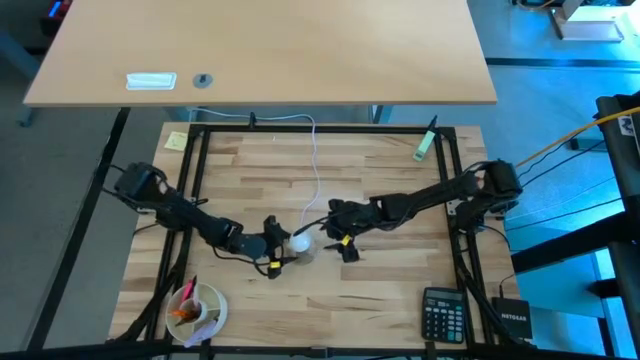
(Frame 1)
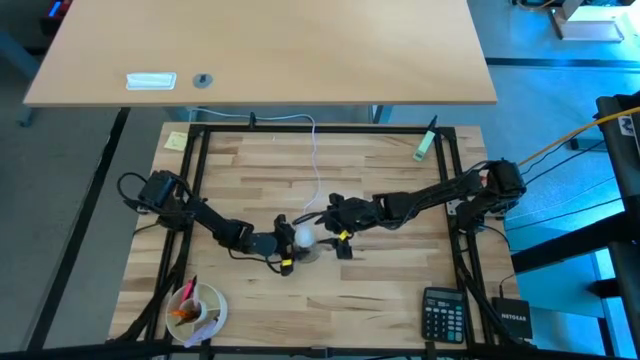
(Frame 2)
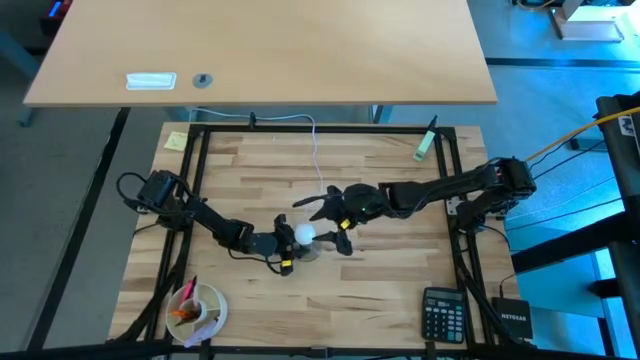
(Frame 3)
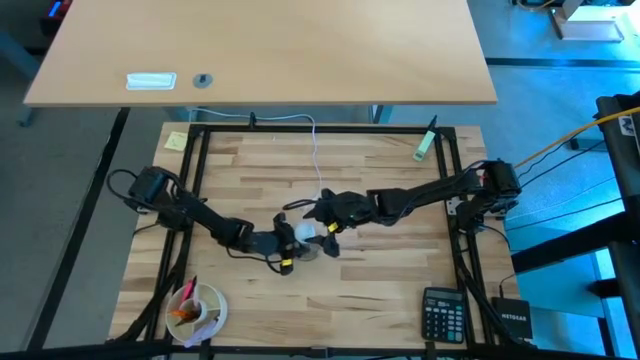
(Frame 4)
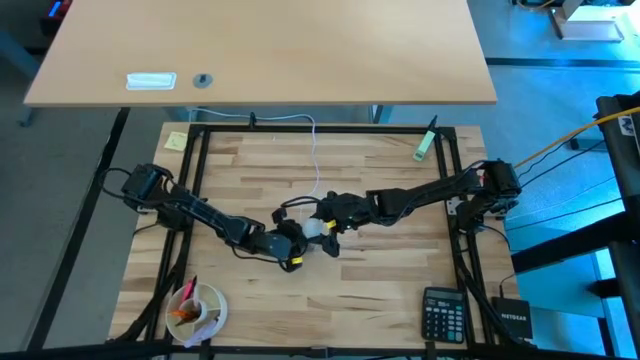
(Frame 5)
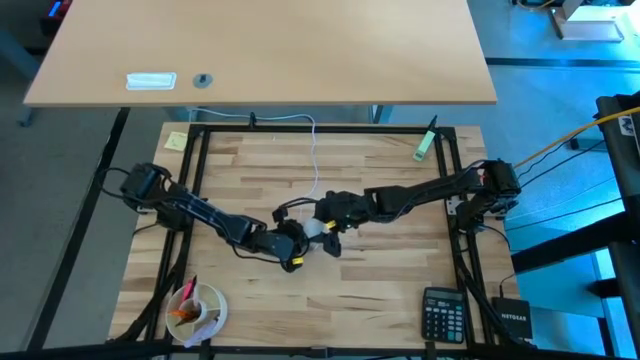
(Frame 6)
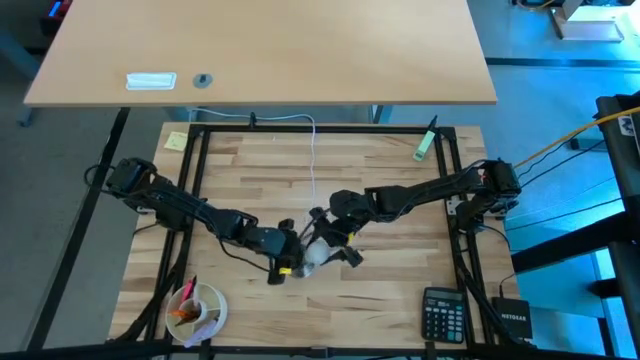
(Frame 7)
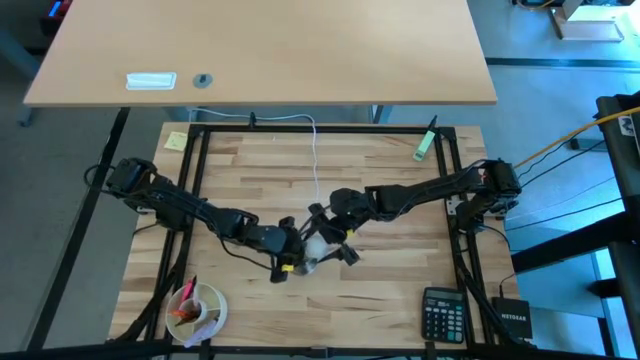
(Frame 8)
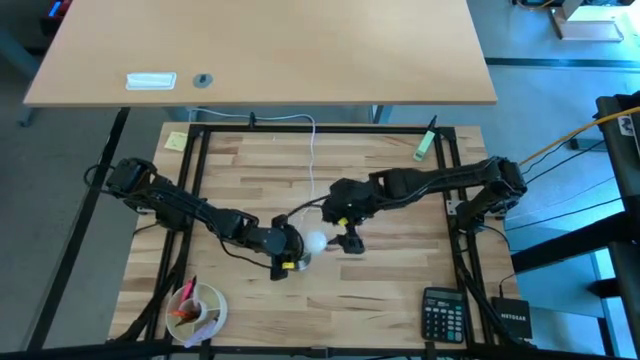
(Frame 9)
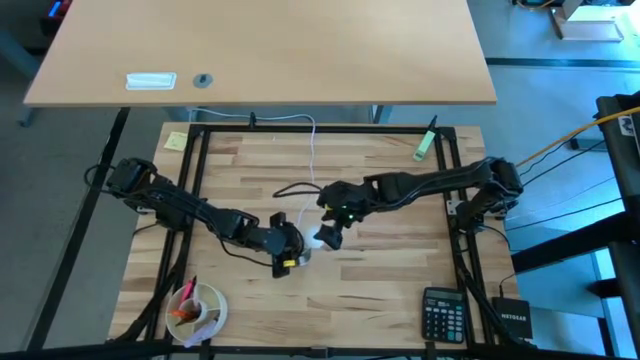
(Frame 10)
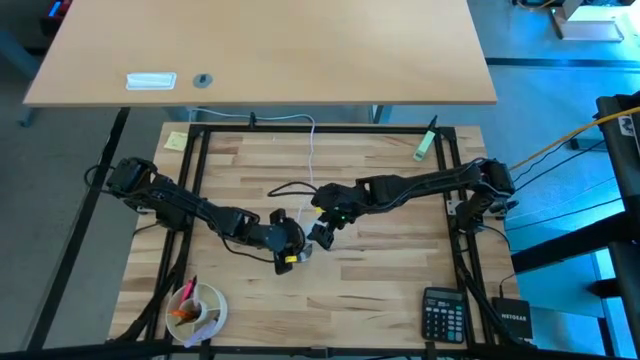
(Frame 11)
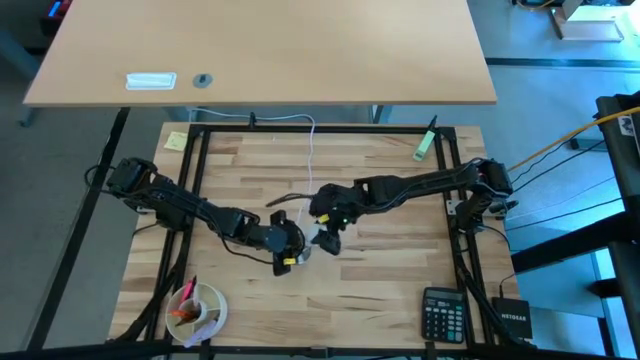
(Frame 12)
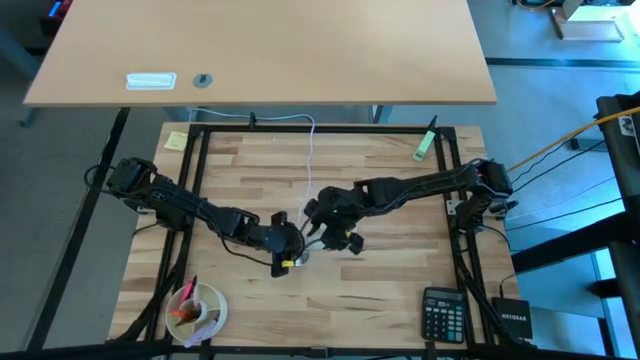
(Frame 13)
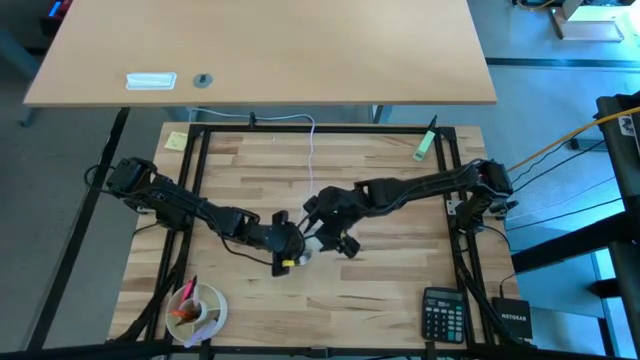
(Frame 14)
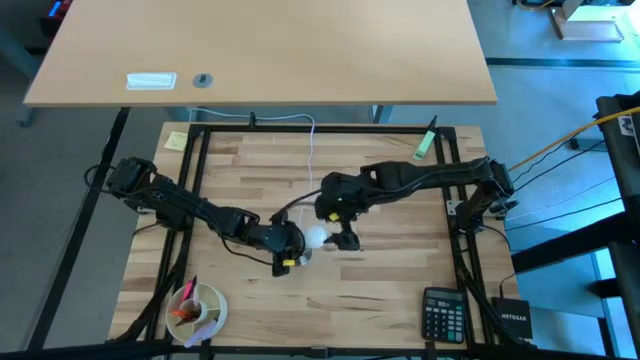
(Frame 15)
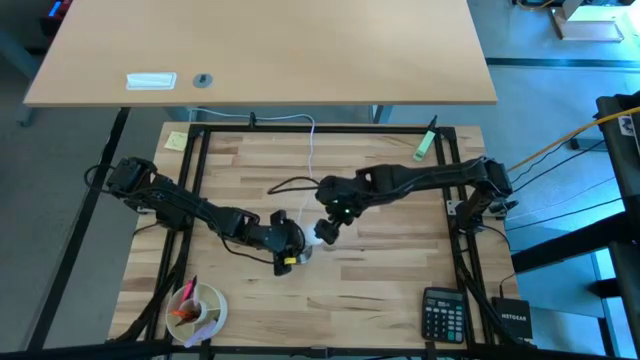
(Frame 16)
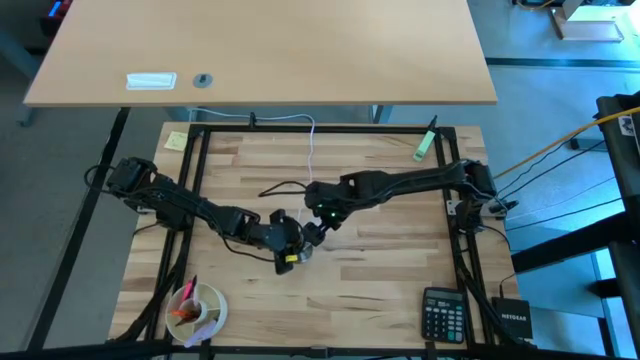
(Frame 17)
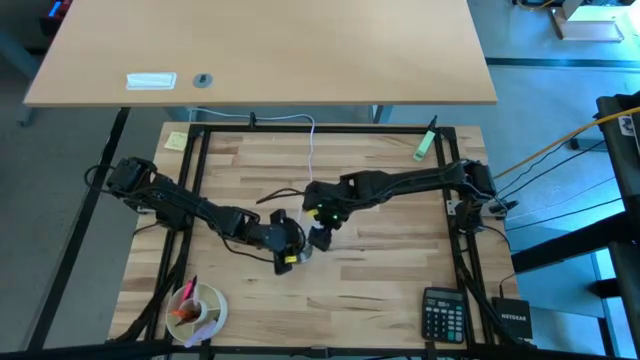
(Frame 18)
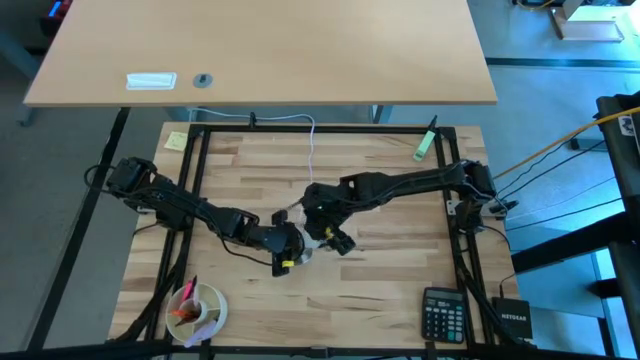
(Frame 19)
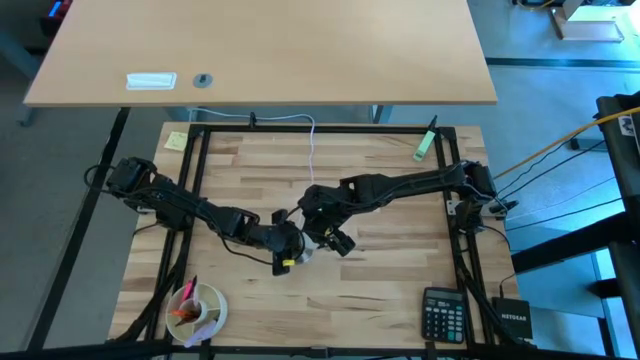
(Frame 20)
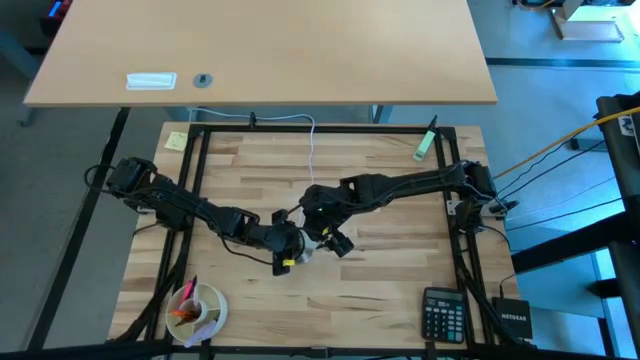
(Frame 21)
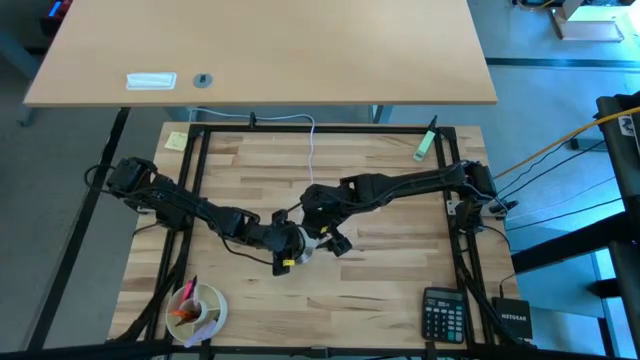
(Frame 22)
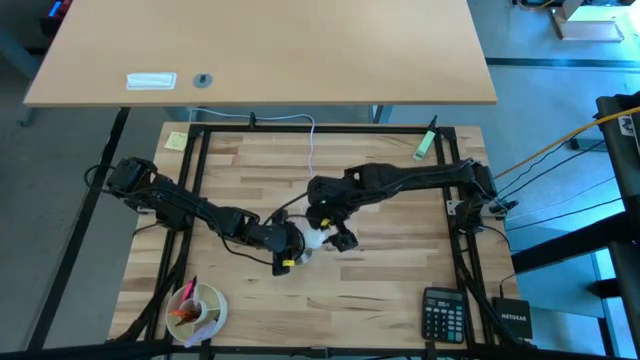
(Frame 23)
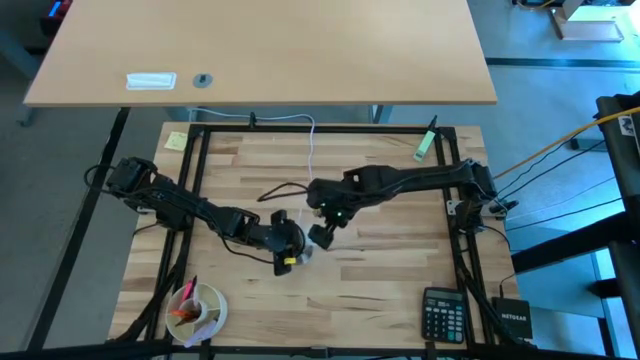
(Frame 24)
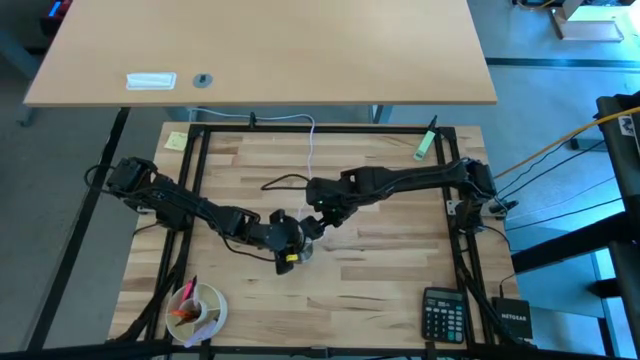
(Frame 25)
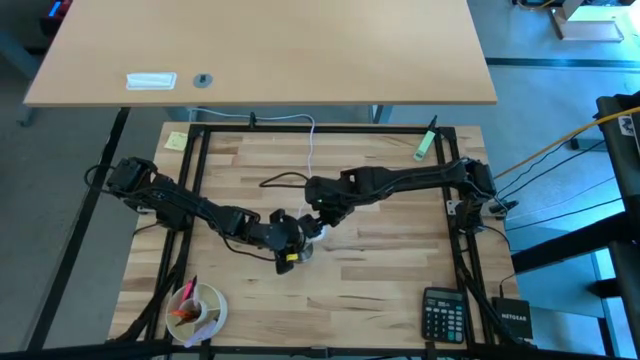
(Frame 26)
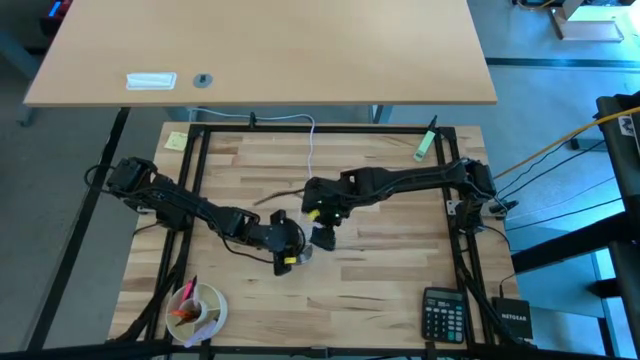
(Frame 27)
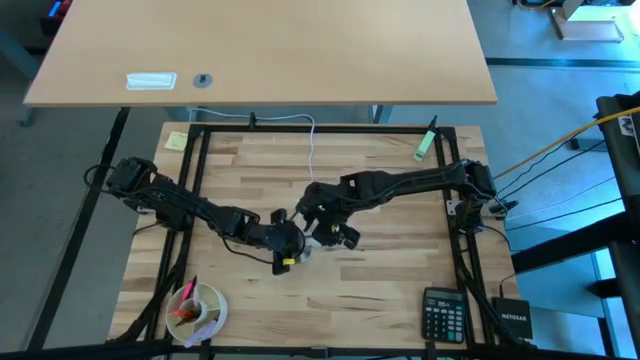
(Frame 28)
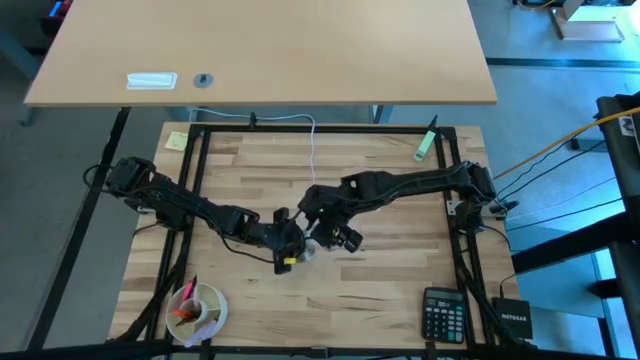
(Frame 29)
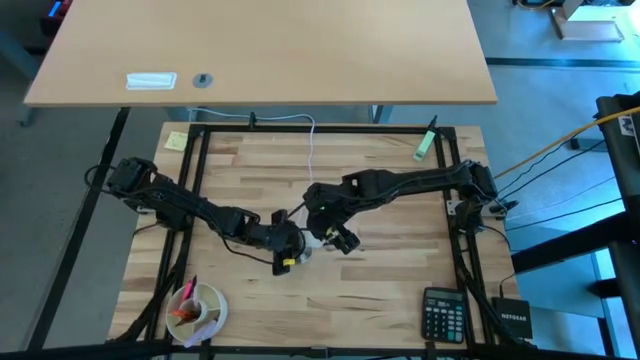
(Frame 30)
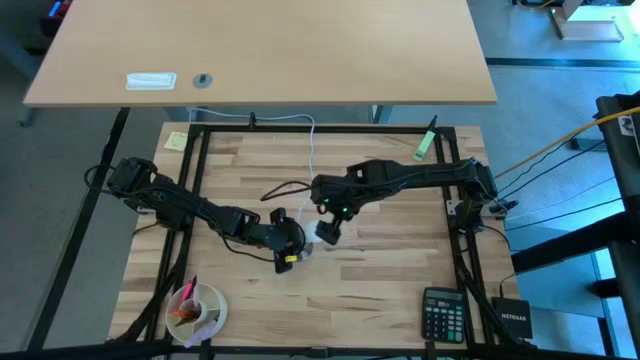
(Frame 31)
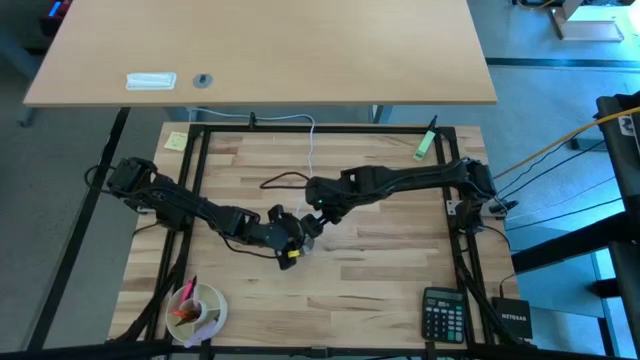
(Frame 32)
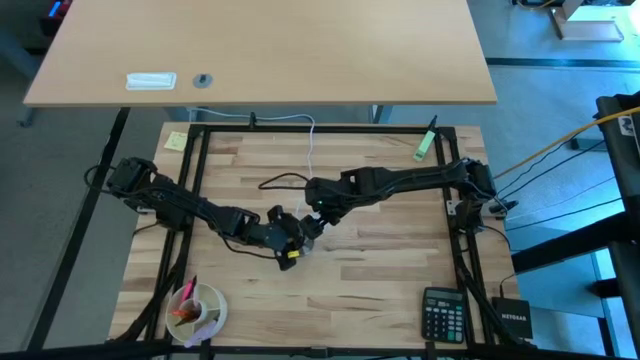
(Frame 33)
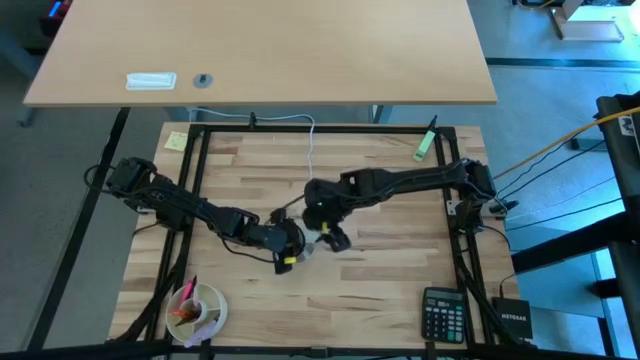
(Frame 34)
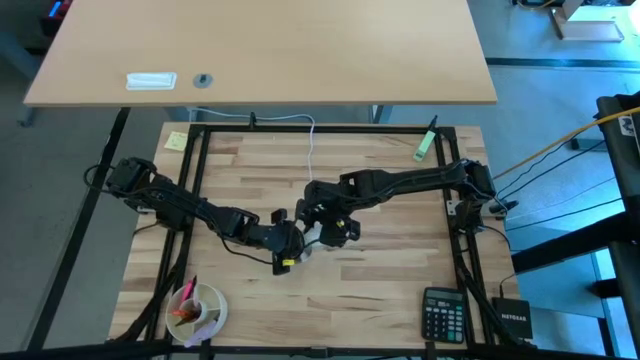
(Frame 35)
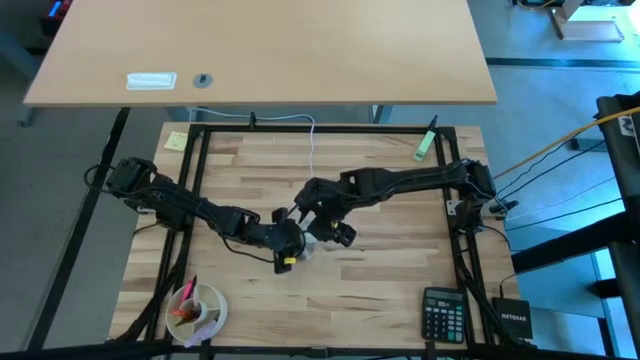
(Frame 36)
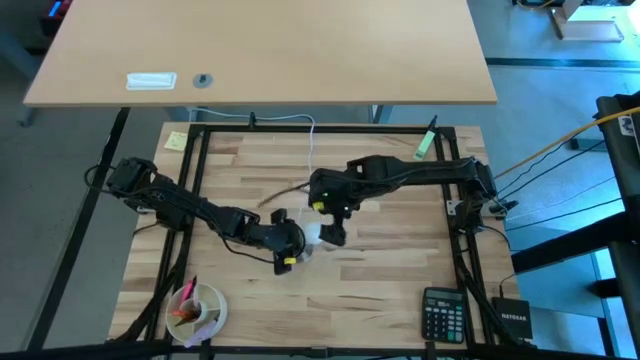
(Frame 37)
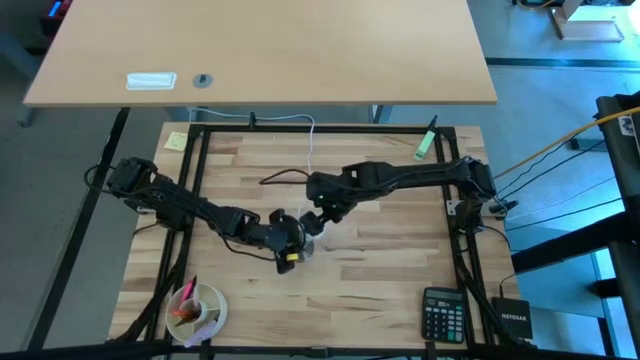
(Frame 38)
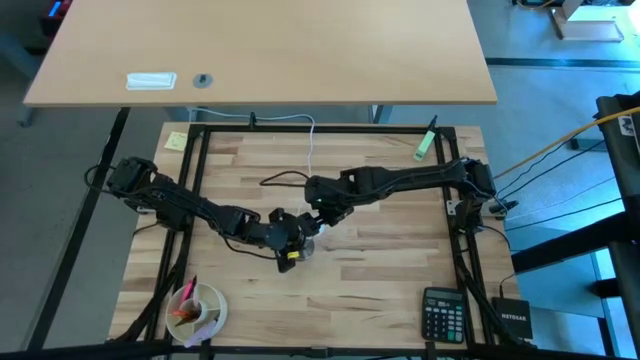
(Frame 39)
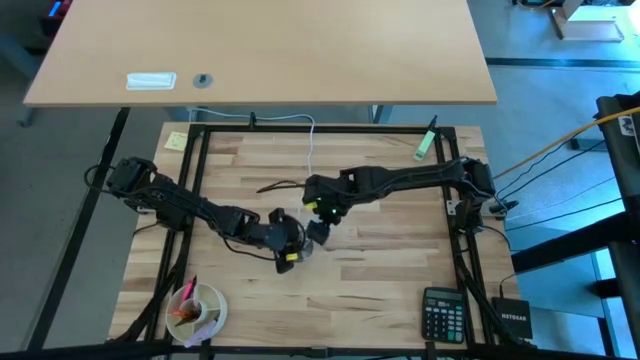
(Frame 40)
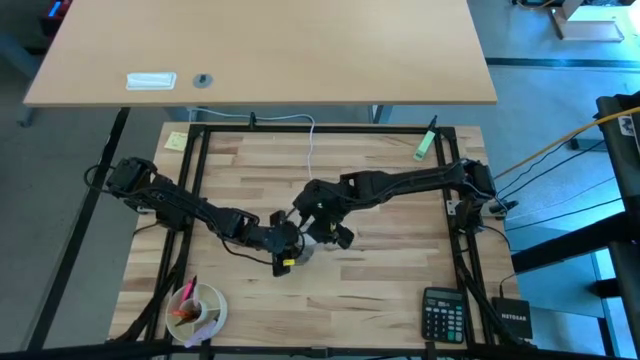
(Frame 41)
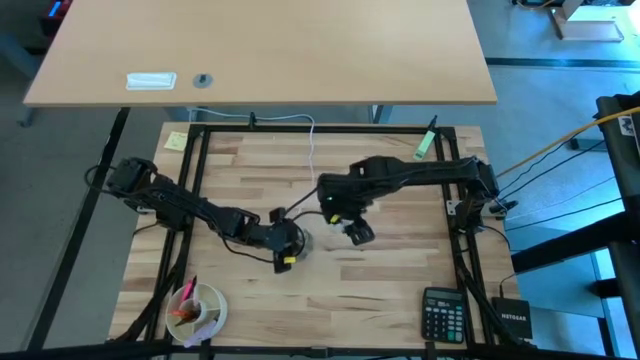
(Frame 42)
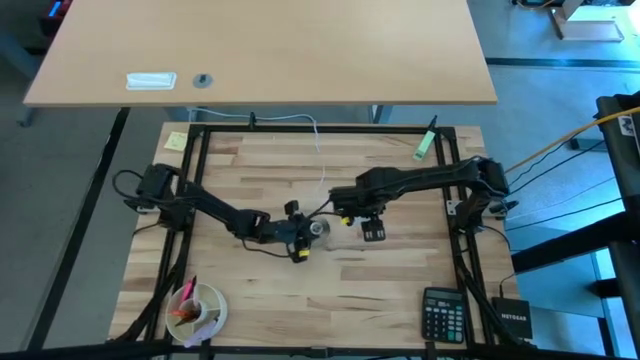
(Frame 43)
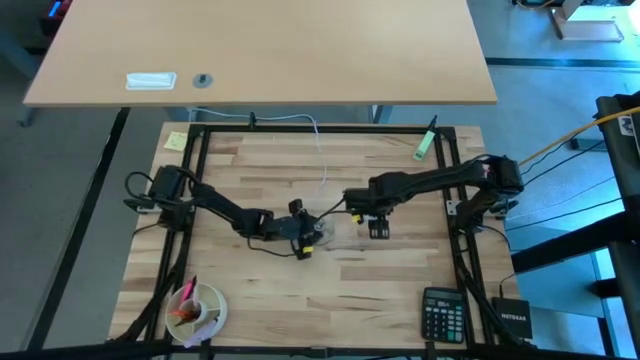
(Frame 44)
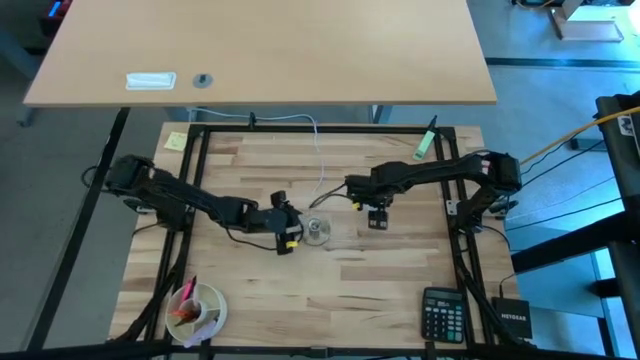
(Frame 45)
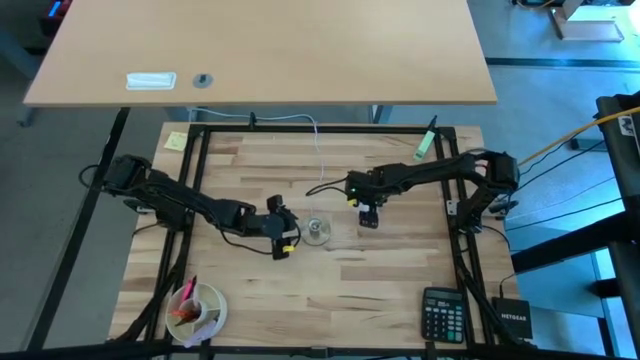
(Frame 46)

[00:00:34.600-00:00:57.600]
Task: Screw lightbulb
Remove the lightbulb from the lamp
